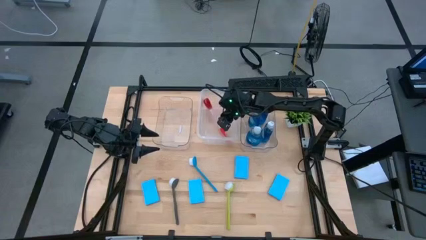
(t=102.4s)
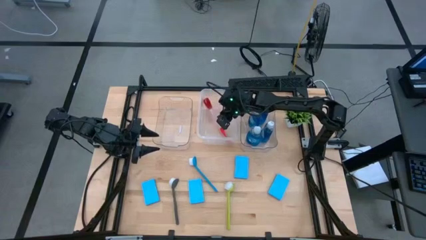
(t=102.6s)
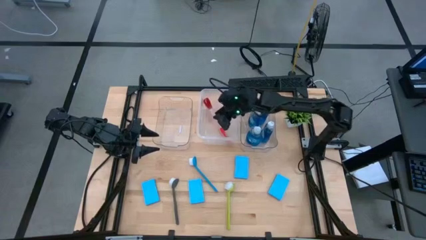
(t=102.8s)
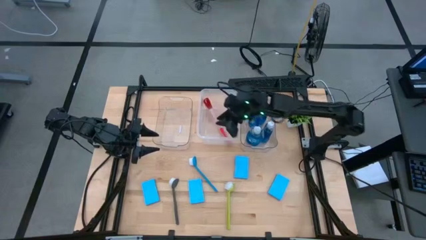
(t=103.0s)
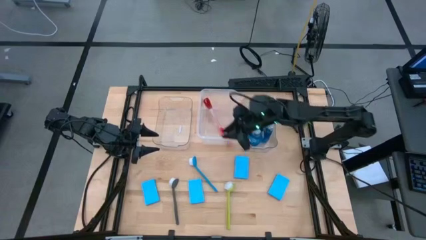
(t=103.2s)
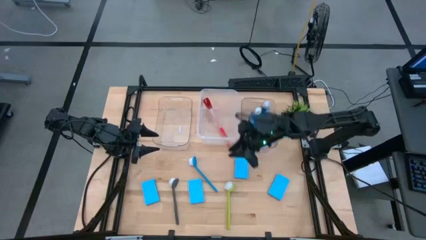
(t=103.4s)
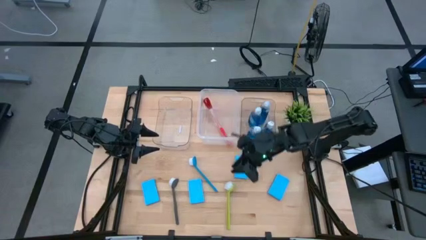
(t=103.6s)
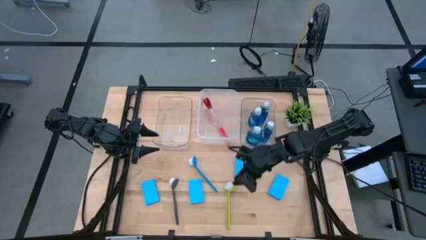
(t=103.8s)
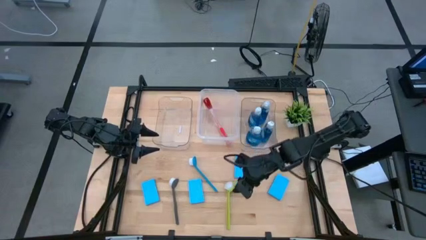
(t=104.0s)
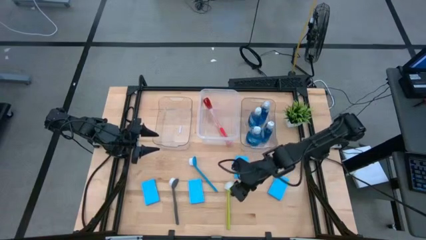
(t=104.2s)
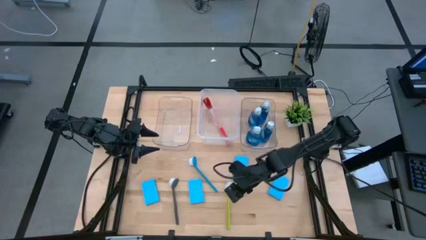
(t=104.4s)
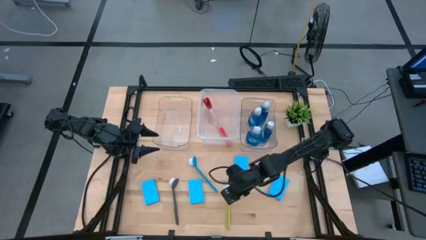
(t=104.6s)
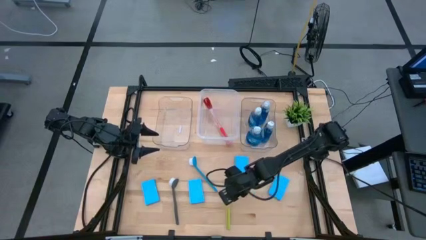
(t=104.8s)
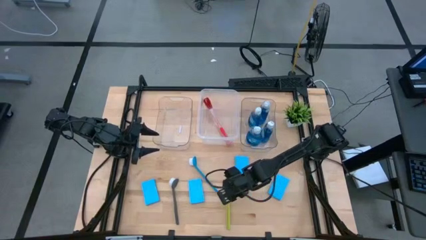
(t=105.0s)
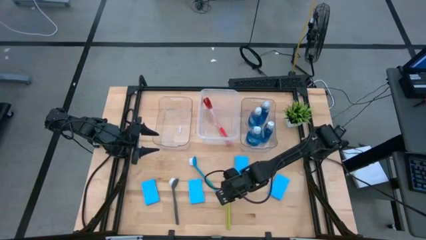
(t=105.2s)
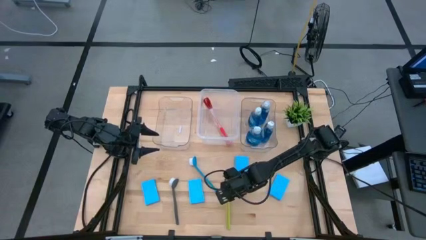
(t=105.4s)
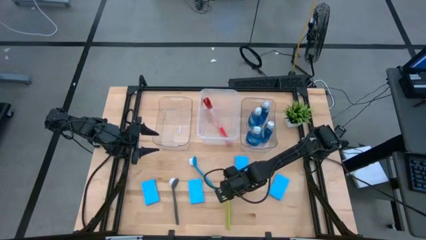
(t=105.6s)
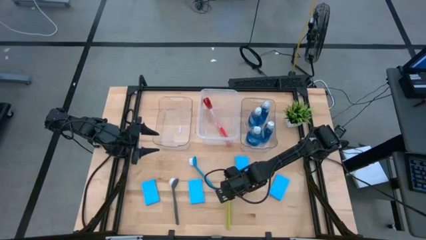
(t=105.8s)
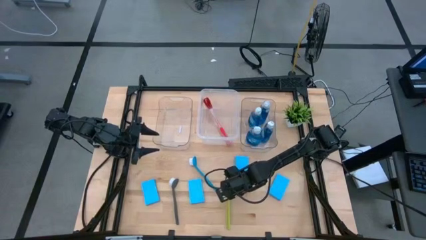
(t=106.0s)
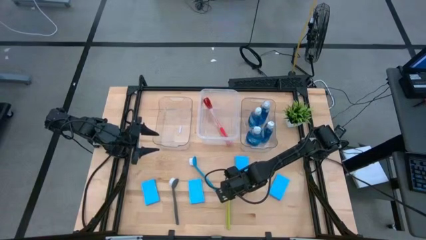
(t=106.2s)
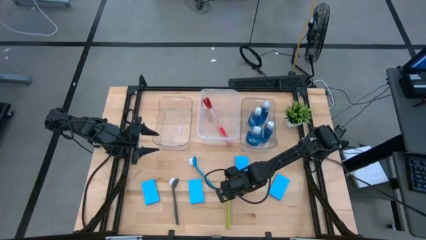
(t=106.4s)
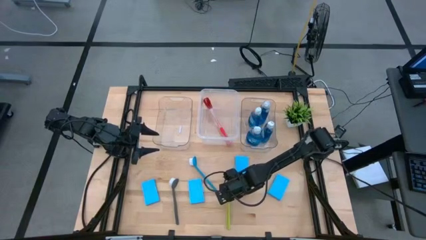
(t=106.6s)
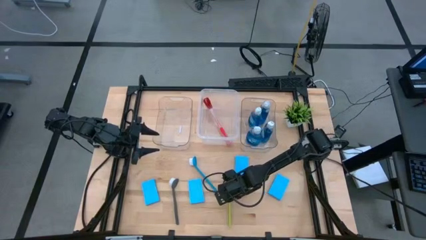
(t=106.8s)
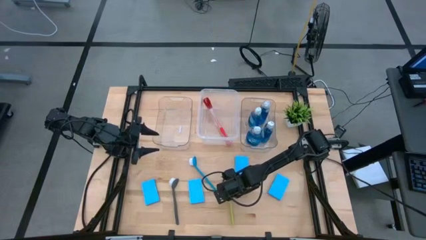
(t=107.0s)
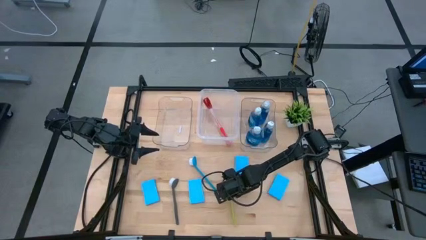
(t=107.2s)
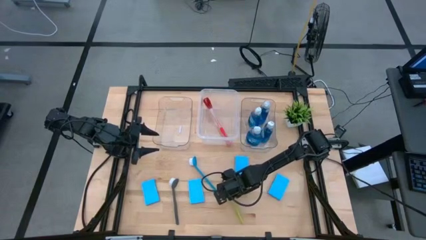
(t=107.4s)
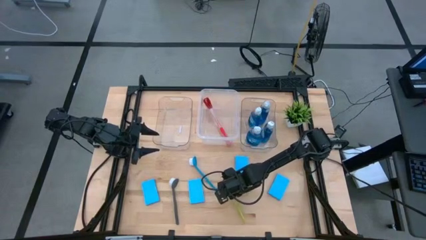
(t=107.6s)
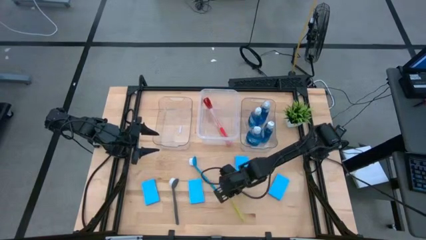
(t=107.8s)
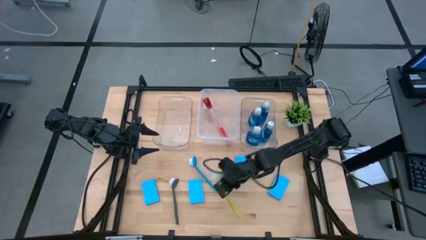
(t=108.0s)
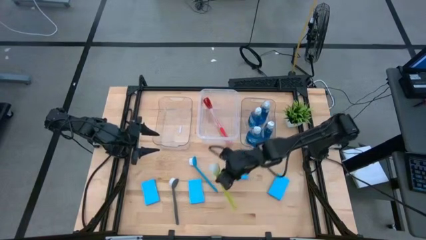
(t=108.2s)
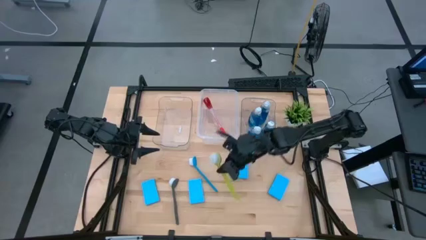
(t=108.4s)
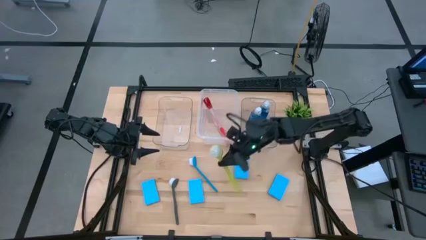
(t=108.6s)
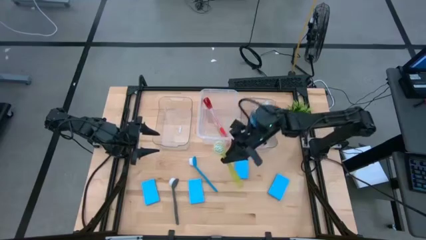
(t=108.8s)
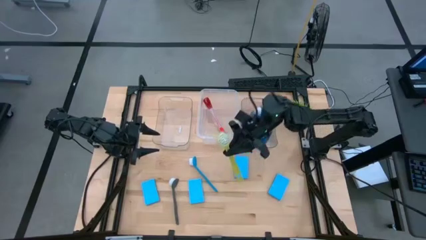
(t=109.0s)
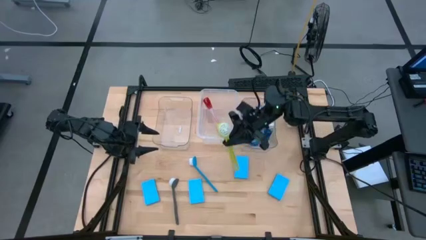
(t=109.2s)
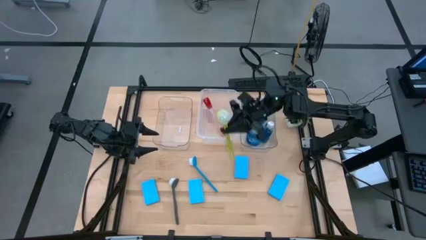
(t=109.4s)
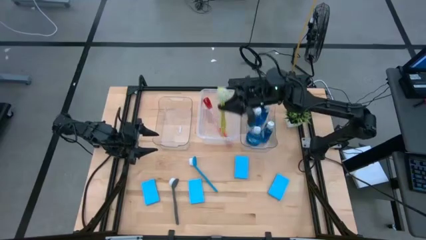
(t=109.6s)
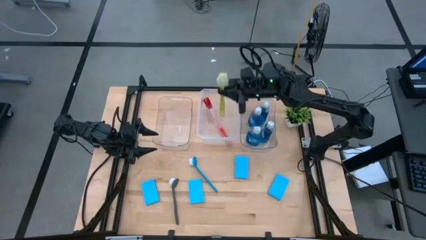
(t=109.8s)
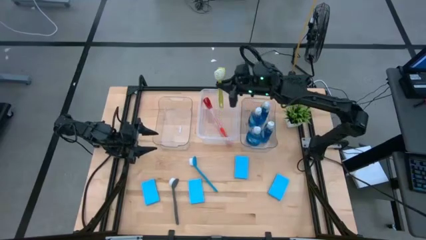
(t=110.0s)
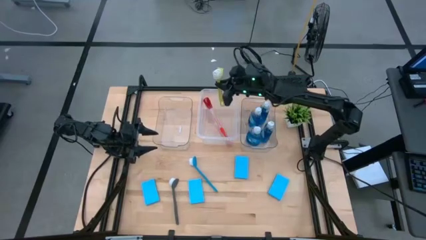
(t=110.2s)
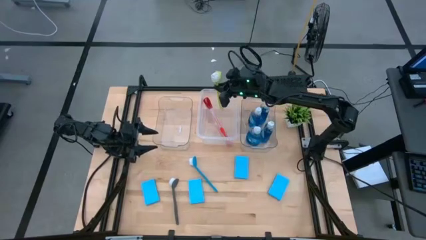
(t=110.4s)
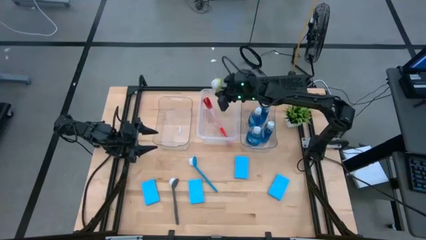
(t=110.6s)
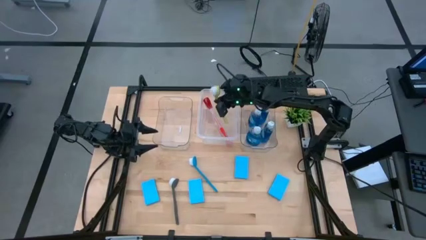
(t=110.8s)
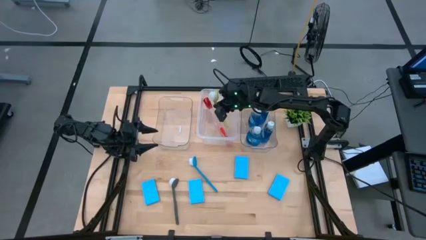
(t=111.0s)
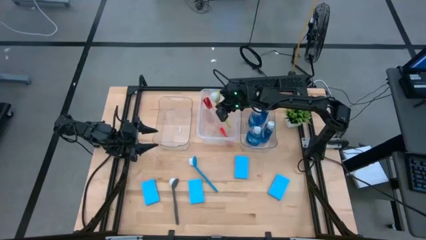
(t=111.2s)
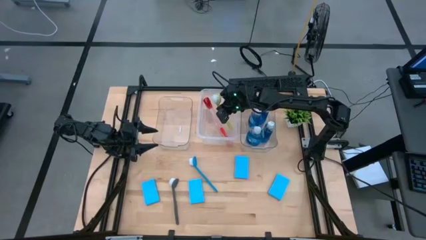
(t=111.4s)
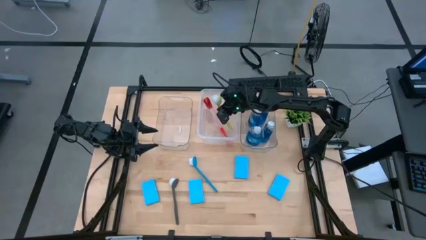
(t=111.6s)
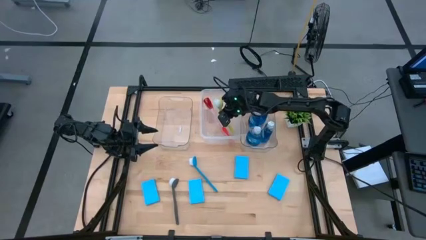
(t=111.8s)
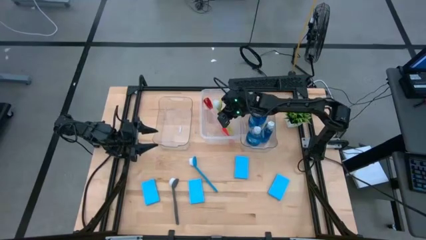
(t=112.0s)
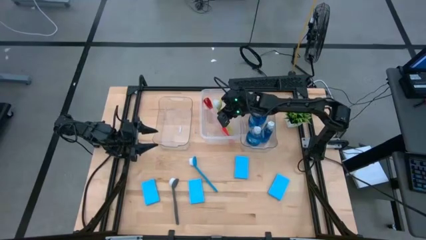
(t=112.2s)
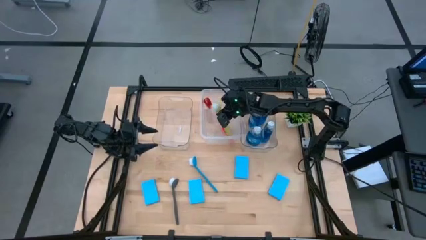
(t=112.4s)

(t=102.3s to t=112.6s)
Task: Pick & Place Kitchen Sink Supplies
Put the green dishwashing brush into the middle transparent bin
